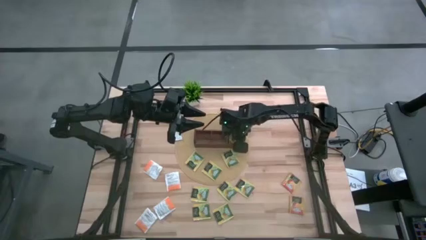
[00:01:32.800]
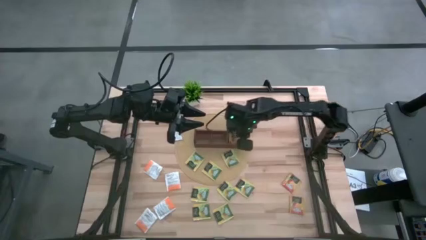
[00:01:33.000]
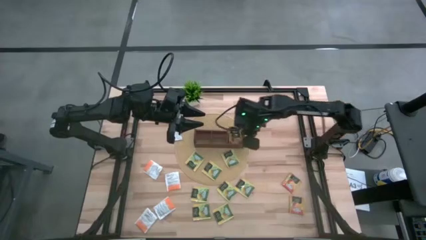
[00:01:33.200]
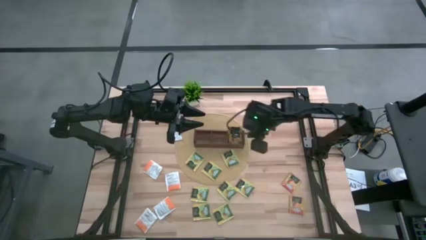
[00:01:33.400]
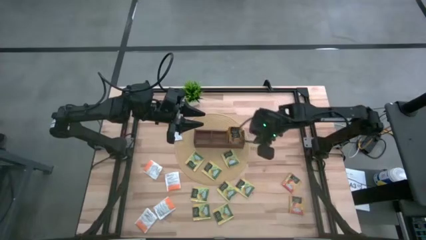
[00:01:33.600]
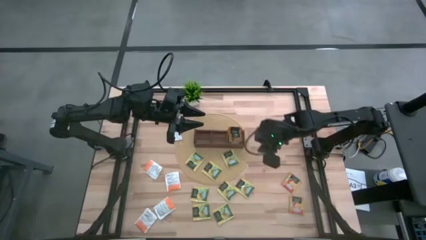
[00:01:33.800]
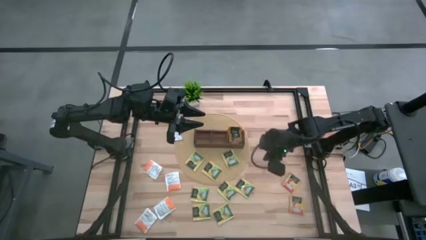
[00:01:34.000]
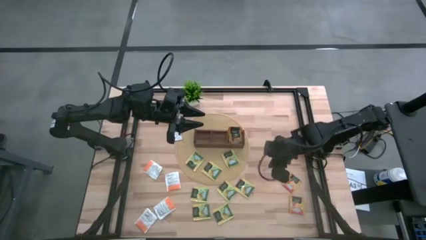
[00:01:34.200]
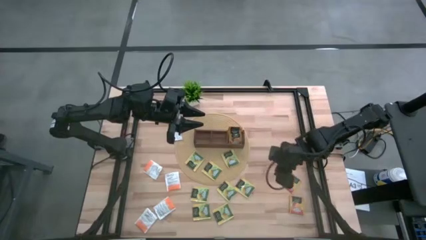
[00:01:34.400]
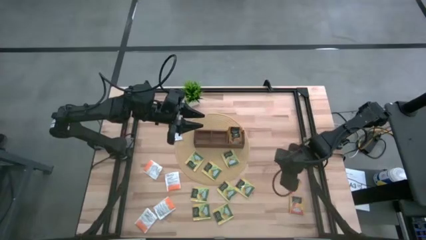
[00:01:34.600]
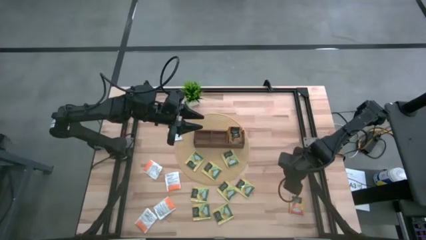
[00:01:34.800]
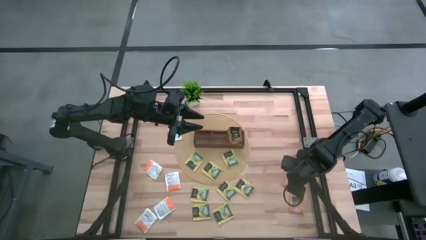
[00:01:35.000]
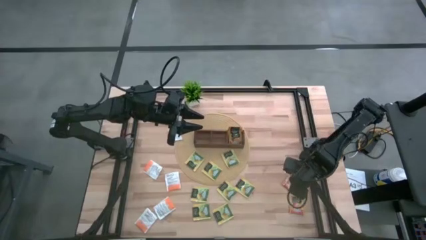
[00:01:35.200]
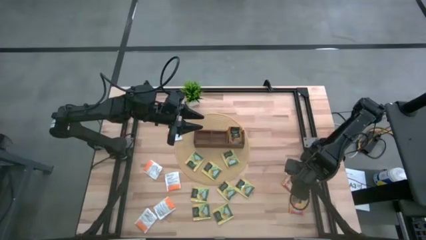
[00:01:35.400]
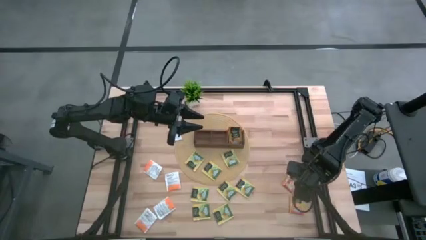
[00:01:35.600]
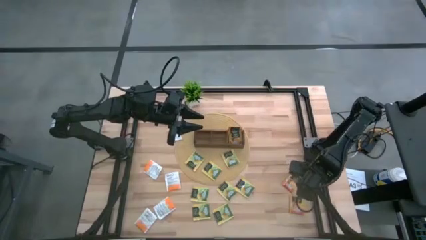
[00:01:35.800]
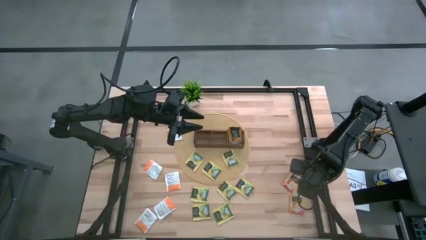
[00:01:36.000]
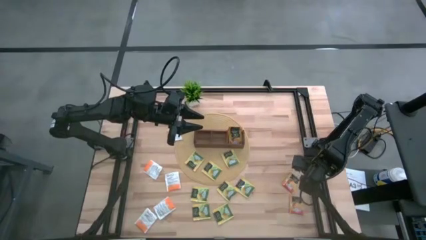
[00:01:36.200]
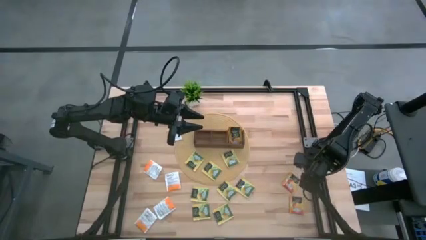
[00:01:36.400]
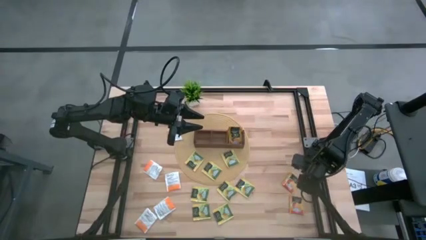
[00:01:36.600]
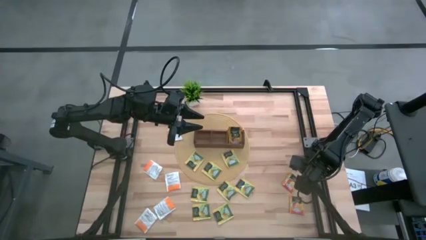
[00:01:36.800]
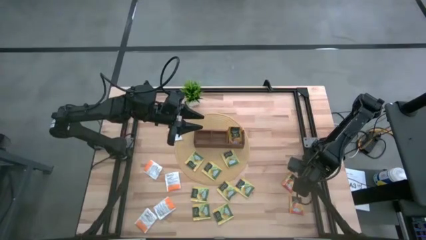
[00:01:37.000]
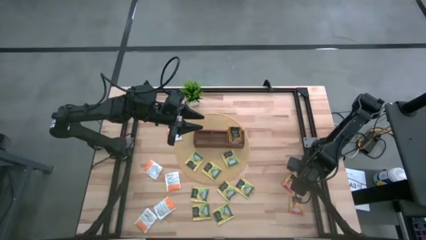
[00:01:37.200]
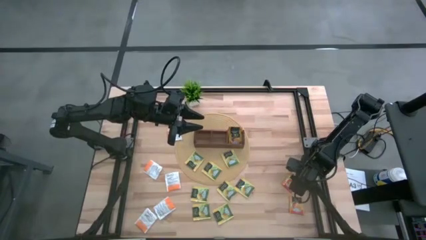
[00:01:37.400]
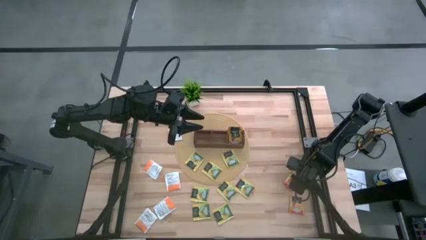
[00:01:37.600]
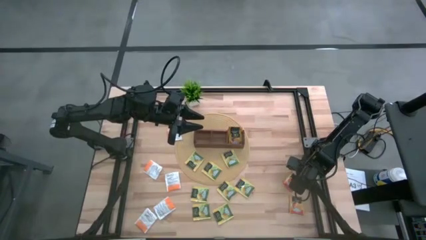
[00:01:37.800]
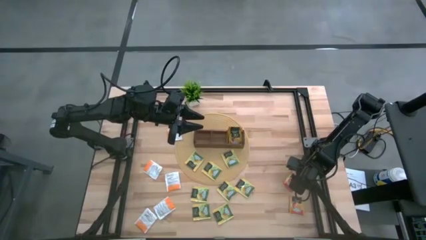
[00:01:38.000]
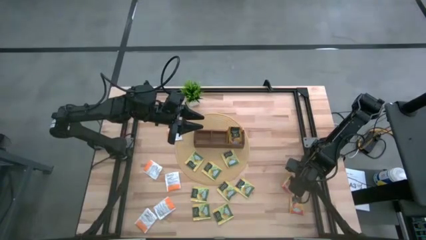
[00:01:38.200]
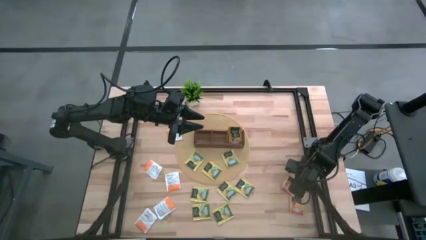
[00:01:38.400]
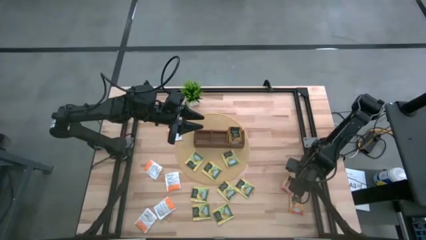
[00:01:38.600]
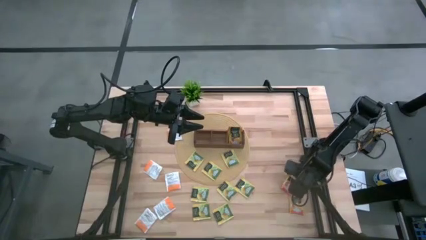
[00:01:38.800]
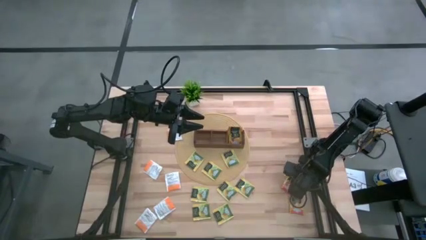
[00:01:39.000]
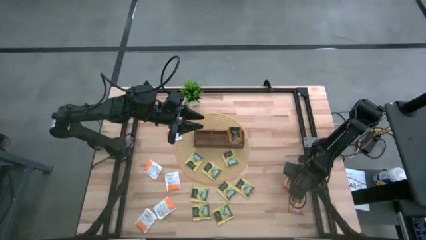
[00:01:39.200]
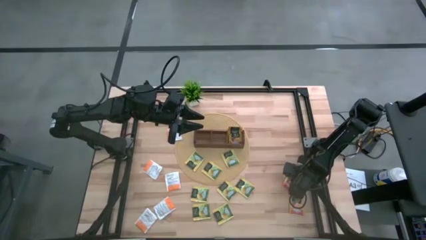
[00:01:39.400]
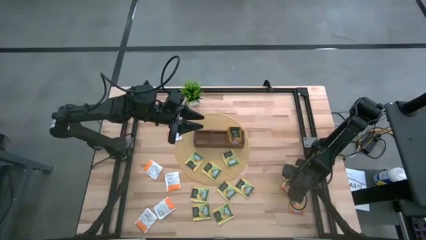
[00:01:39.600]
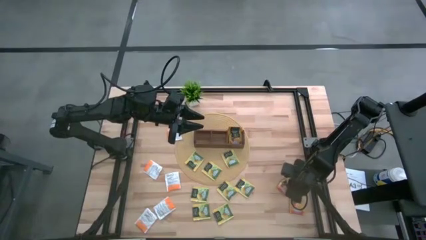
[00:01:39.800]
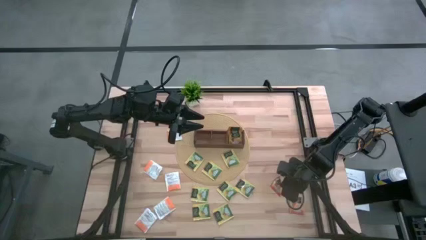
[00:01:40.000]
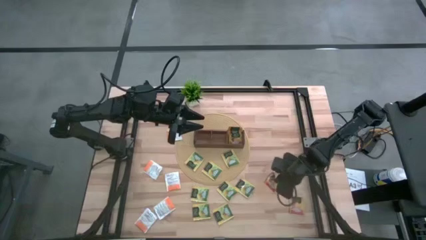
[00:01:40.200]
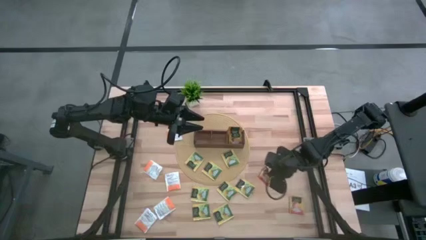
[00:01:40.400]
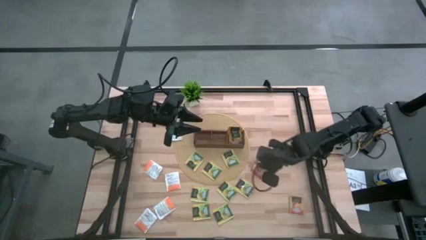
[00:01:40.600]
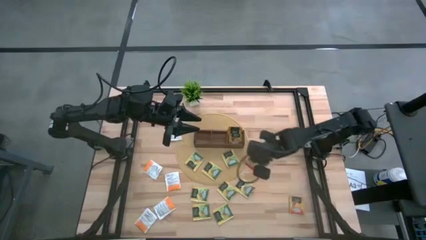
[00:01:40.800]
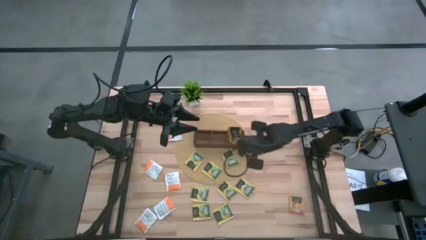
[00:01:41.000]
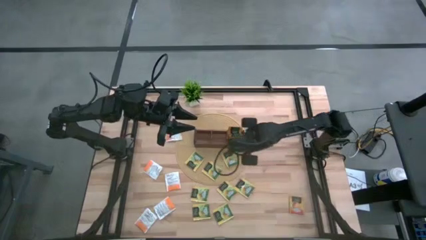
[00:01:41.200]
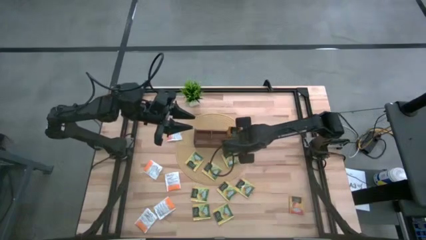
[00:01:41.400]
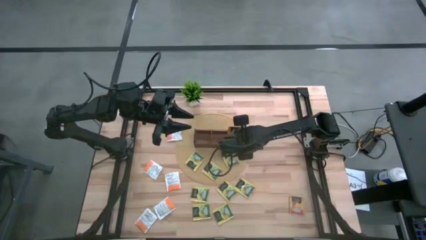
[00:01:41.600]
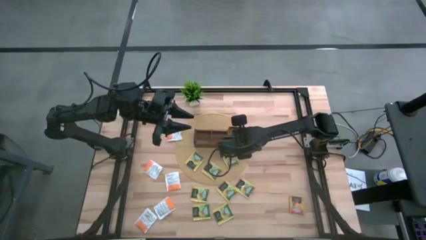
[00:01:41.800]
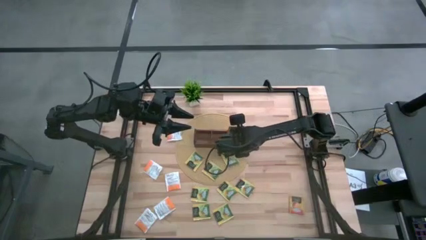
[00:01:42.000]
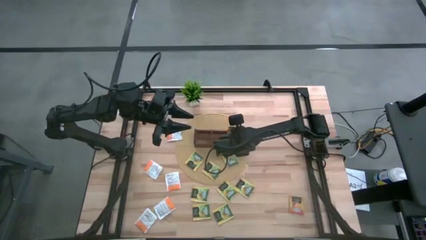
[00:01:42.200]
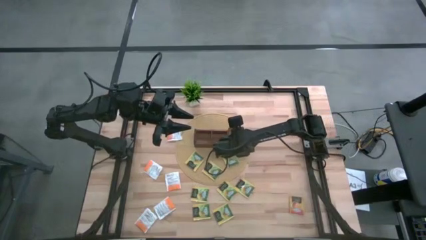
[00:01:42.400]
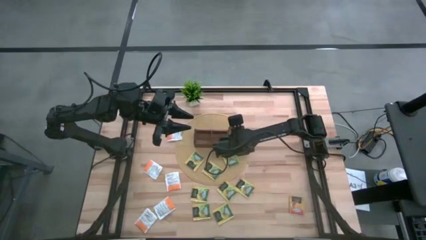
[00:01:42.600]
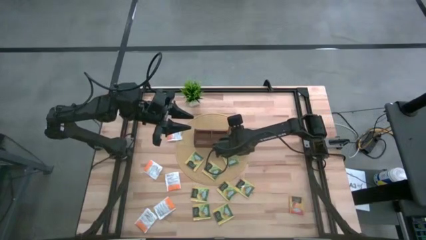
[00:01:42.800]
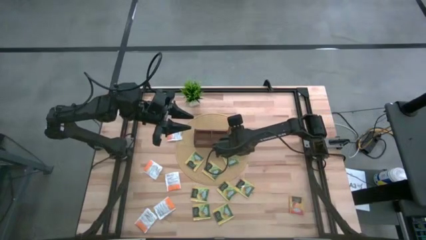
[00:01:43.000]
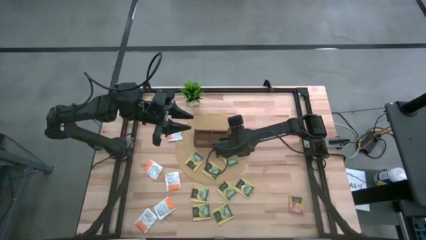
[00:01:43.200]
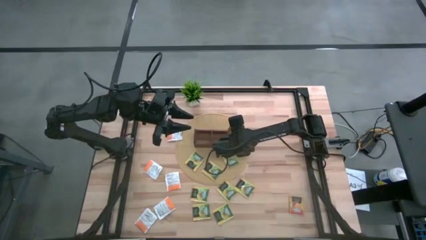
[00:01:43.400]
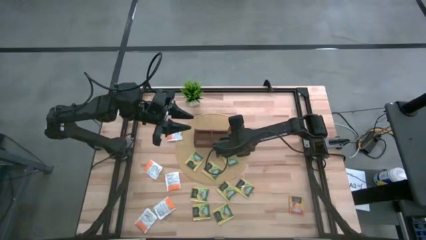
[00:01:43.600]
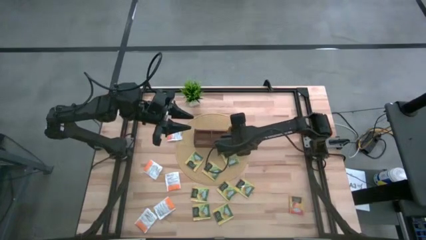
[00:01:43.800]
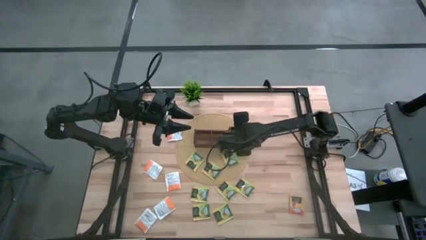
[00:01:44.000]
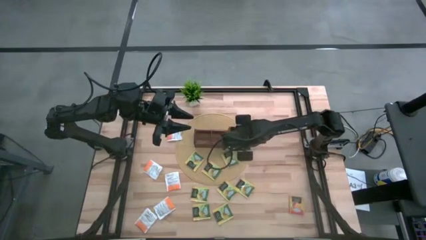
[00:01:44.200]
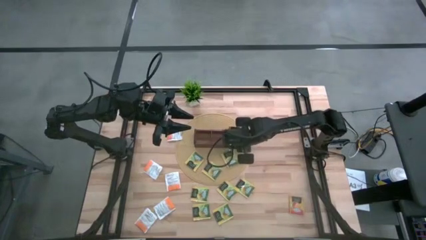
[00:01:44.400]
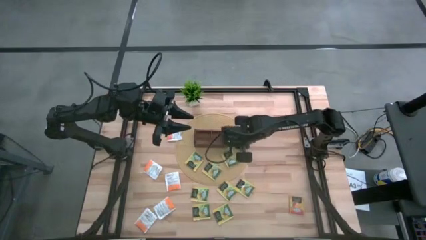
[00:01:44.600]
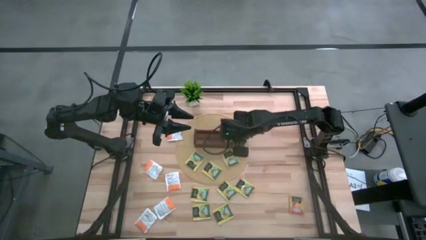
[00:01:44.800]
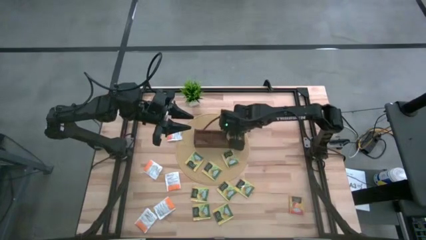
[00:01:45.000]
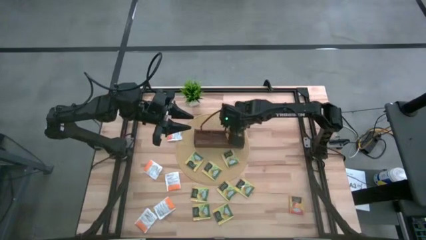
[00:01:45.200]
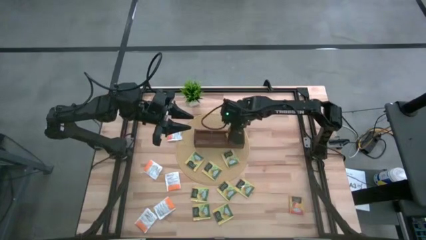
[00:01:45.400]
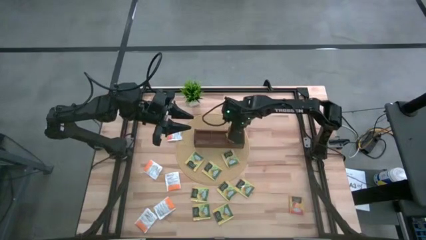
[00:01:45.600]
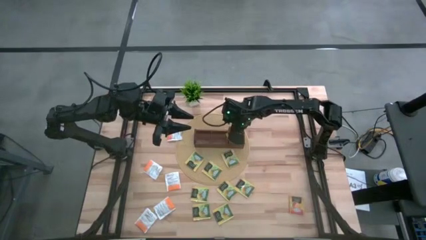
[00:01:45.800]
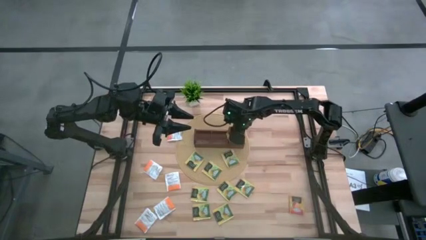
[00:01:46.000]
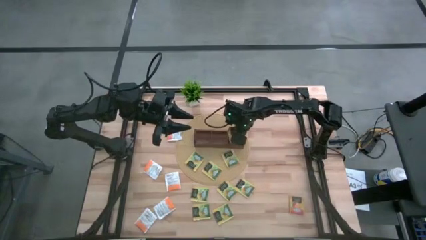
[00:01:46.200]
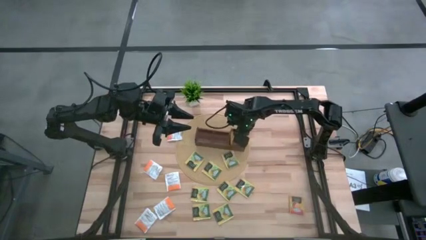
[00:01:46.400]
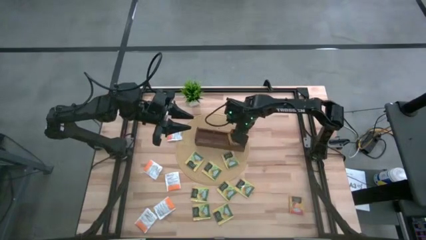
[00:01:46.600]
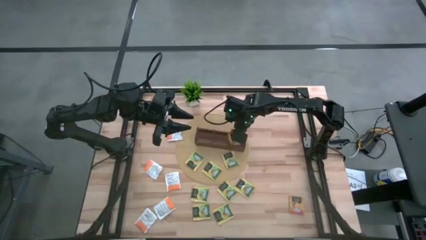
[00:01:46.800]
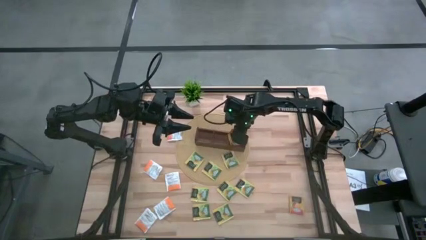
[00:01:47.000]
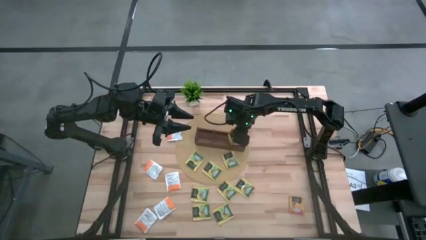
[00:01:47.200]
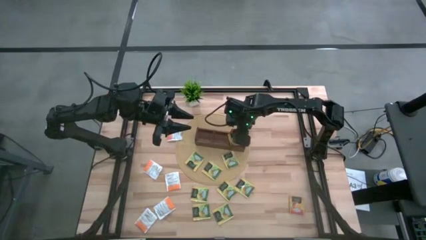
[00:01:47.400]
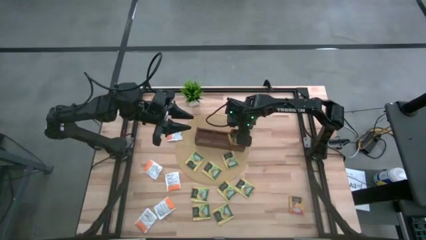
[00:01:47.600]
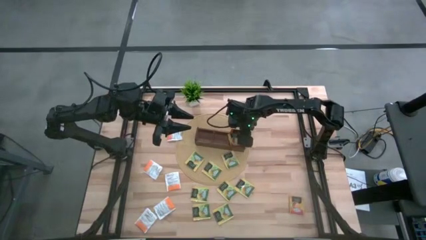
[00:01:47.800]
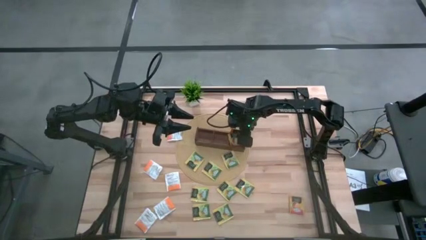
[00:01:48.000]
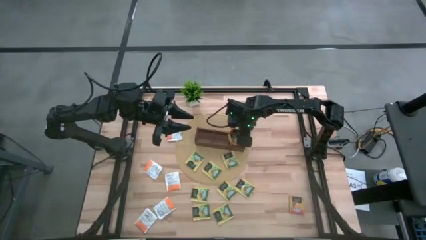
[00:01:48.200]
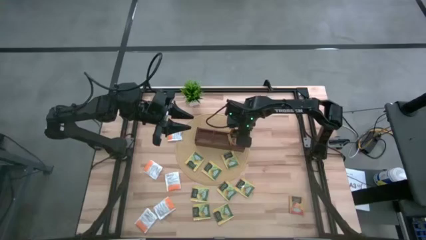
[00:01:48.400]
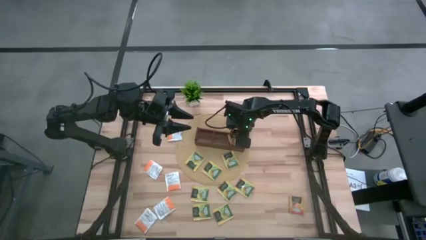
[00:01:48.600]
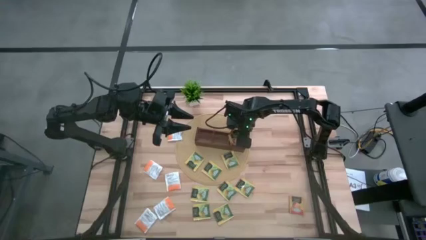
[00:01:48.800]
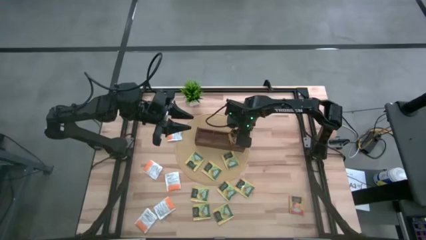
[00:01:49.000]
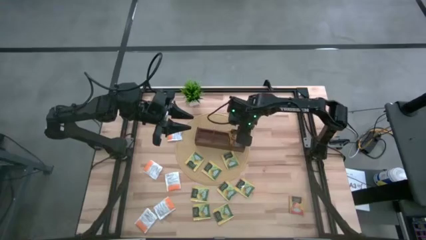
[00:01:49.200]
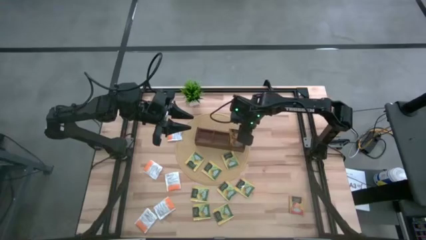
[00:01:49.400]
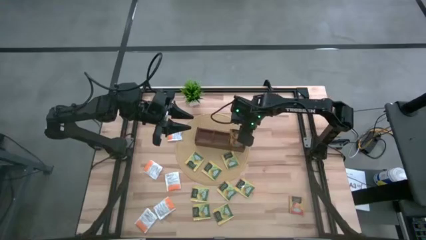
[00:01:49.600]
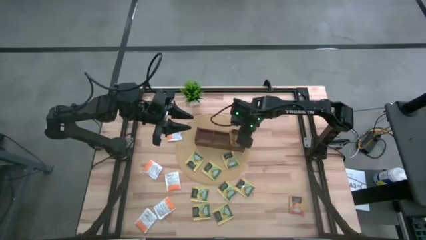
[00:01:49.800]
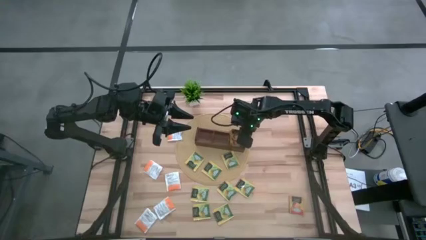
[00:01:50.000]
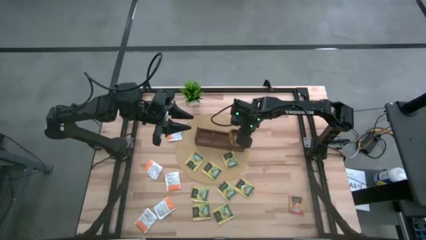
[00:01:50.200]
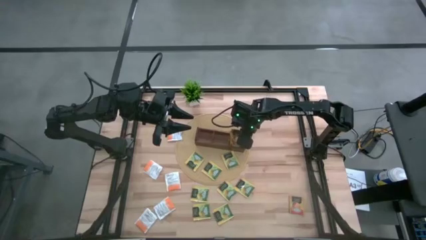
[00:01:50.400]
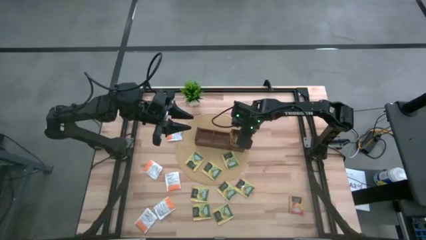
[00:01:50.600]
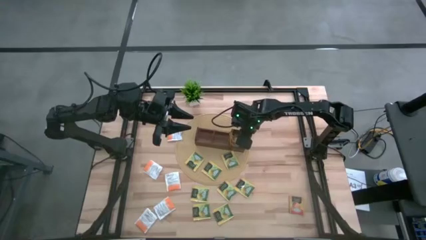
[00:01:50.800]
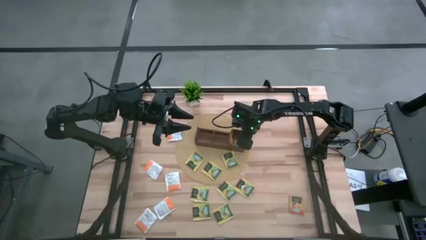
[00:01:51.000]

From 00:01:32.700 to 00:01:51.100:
Task: Pick & Place Tea
Put the orange tea bag into the right section of the wooden organizer
